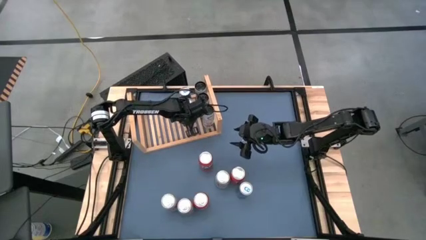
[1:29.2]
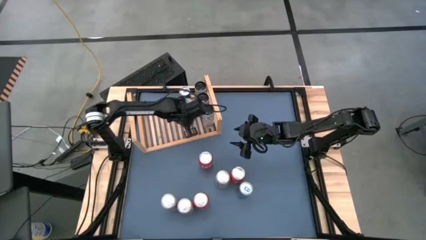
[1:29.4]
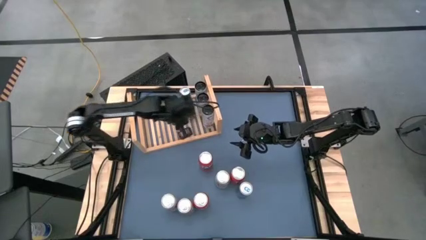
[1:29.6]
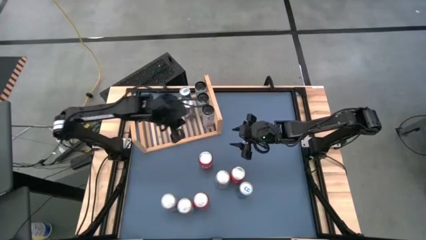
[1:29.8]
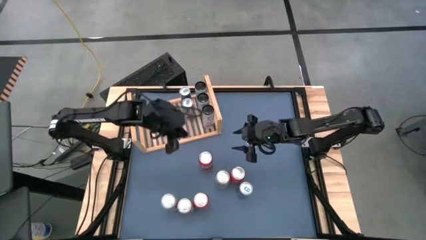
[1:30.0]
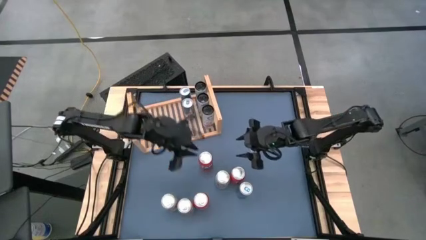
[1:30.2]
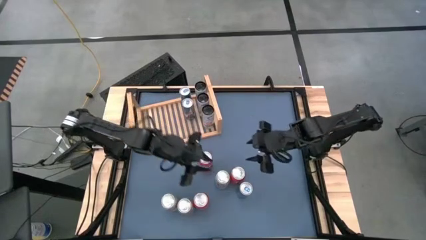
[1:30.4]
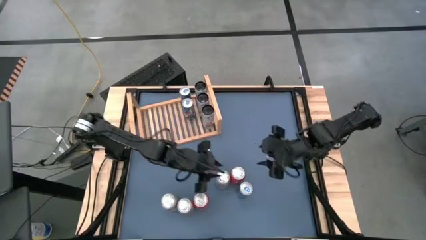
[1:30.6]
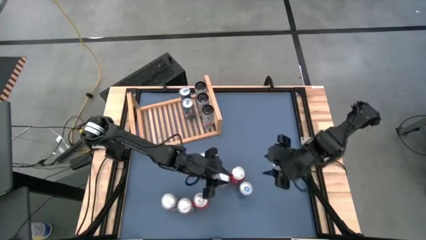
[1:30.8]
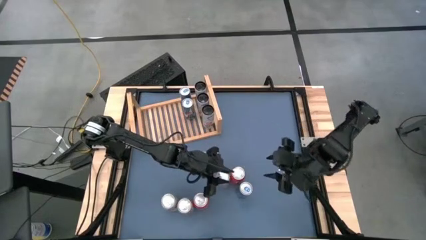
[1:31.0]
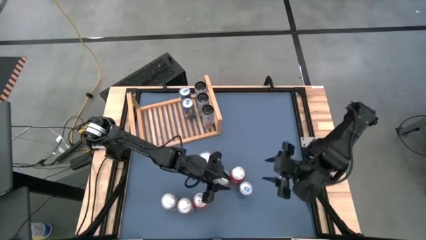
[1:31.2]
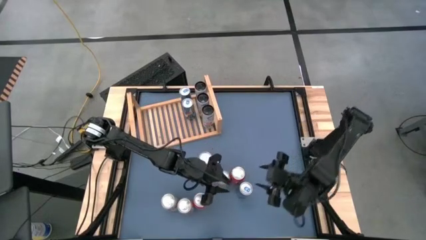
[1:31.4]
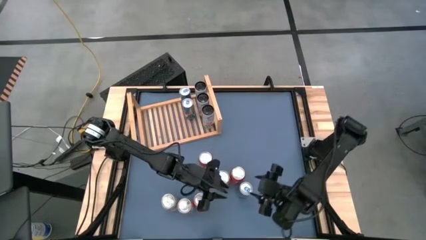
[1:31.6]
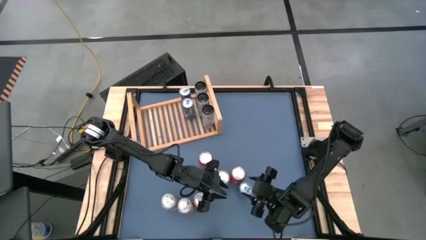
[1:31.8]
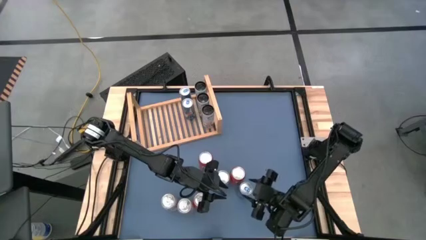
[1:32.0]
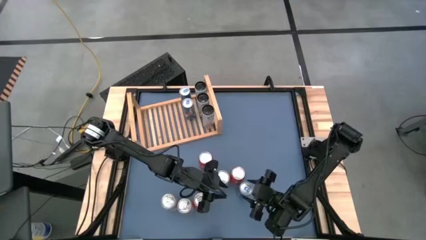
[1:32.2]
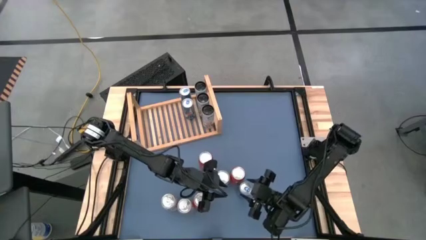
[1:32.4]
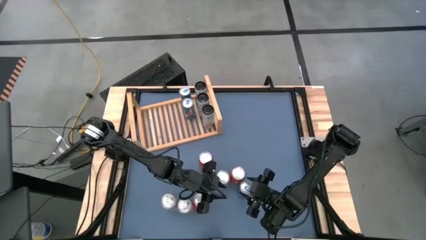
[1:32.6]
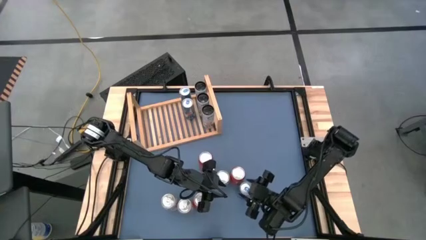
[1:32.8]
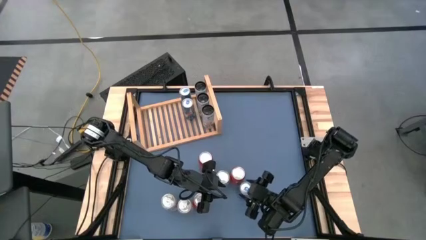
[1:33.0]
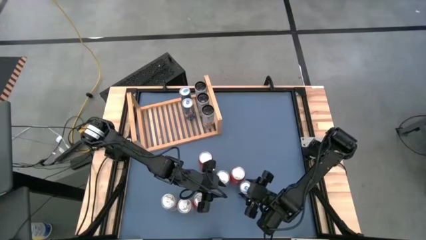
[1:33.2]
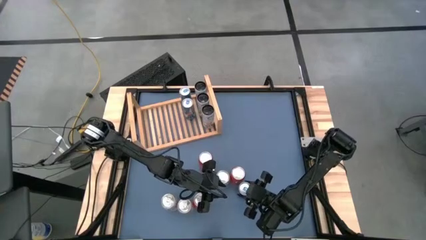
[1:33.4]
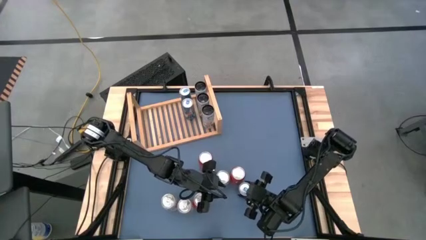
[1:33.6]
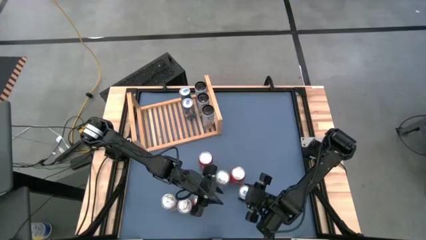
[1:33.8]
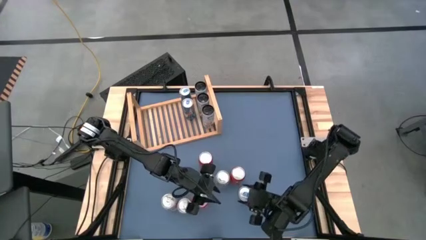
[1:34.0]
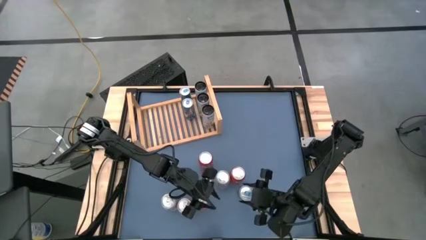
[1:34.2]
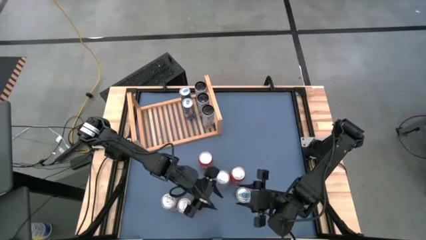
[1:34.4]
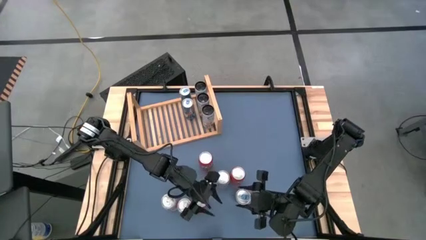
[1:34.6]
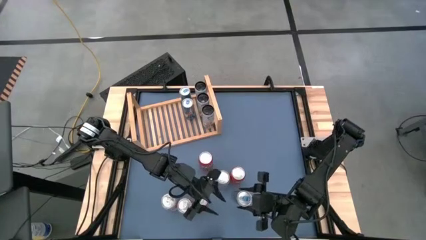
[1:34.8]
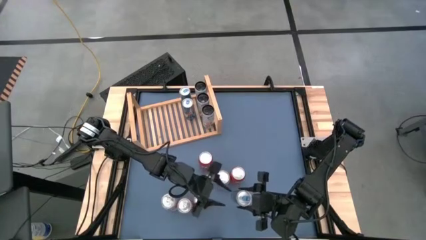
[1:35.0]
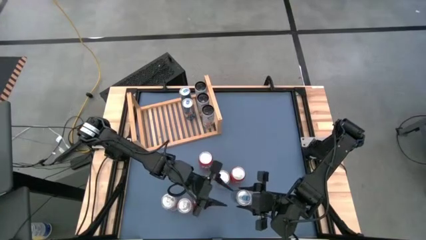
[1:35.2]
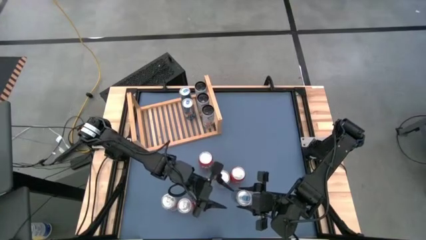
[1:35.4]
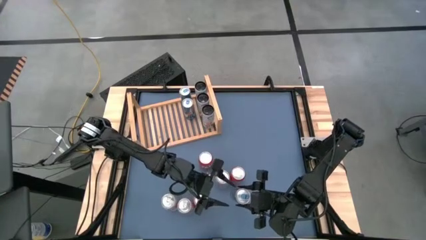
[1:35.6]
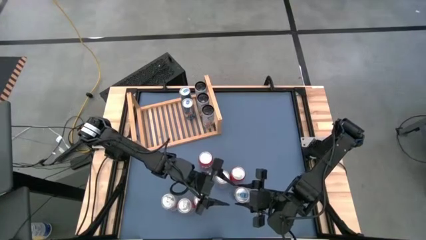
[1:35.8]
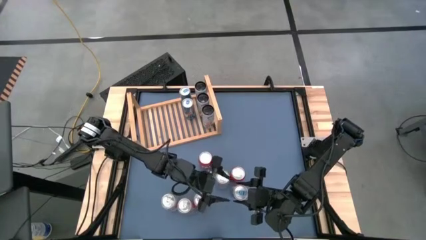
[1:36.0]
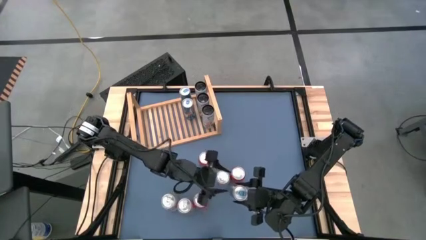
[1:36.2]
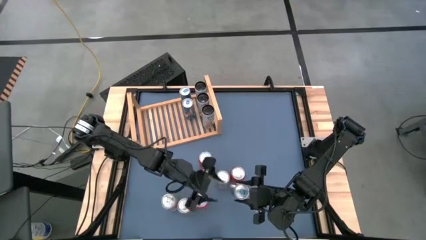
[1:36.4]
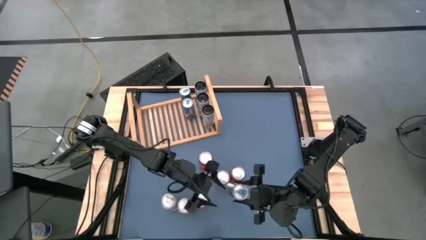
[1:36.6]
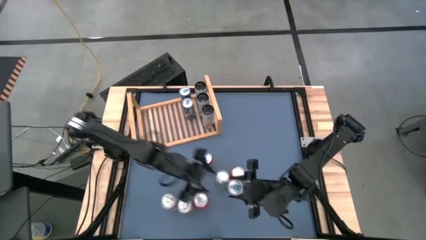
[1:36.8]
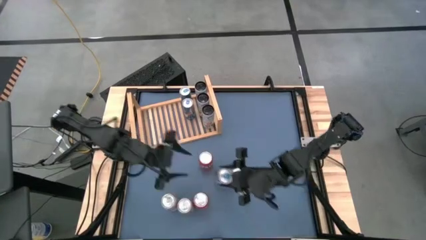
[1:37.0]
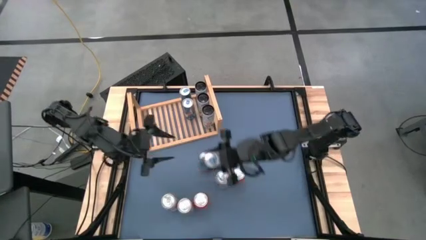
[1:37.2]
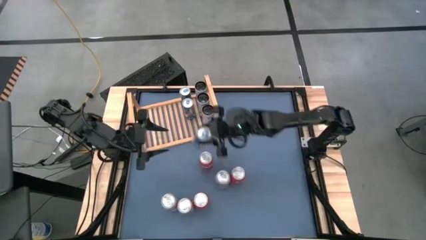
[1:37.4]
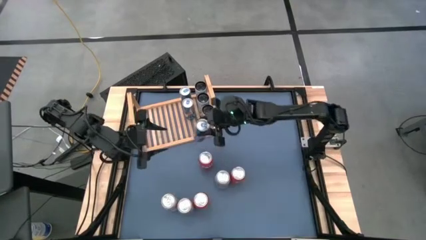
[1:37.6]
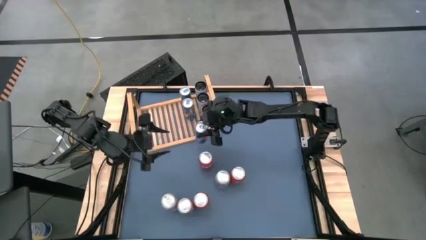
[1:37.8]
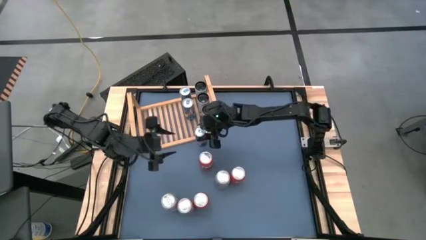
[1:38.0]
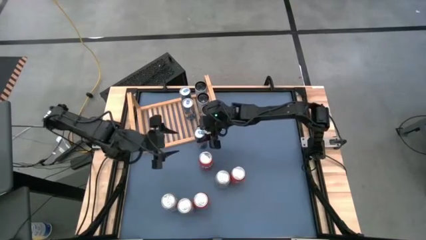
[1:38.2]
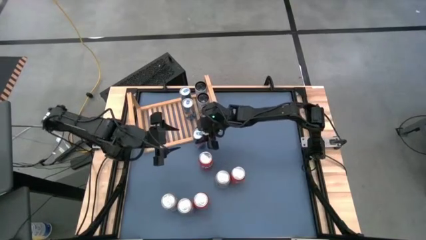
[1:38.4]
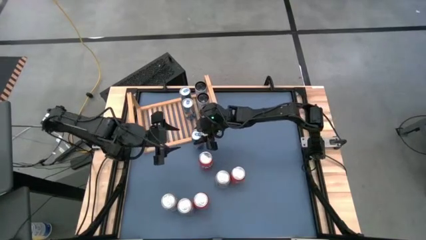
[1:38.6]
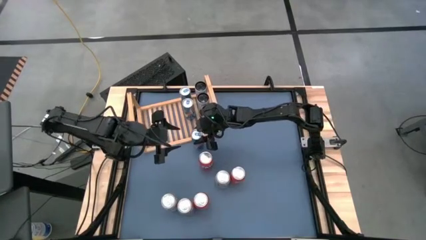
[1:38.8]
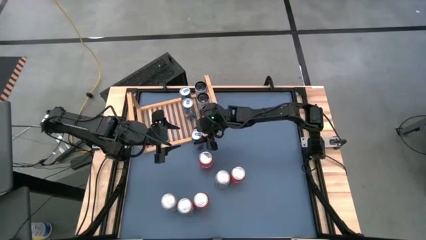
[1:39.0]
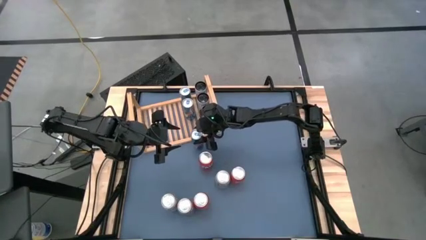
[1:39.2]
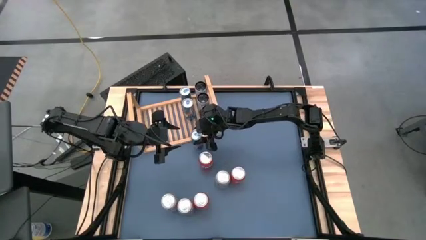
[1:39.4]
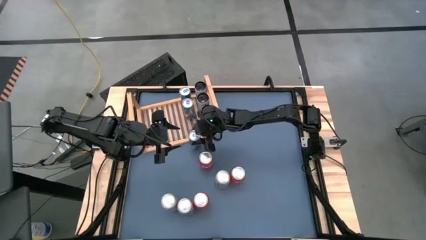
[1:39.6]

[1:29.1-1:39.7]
Task: Place canned beverage on shelf
Put the blue soda can on the shelf aligned with the other blue soda cans

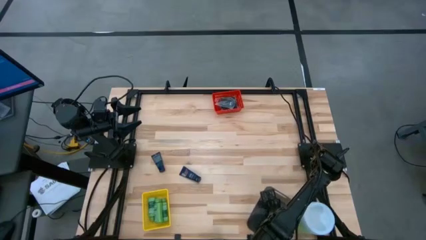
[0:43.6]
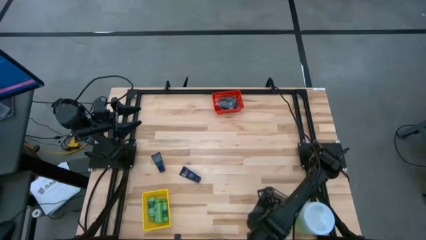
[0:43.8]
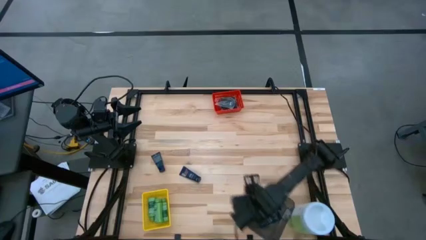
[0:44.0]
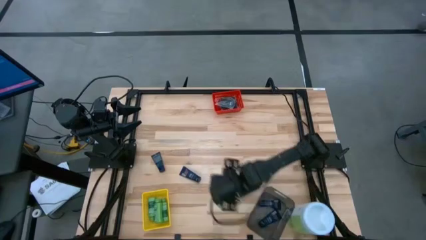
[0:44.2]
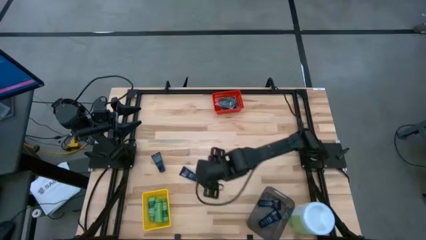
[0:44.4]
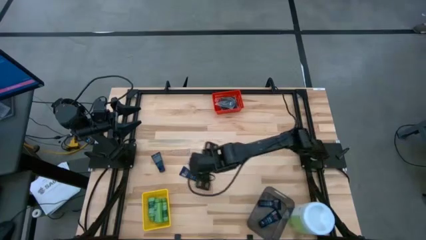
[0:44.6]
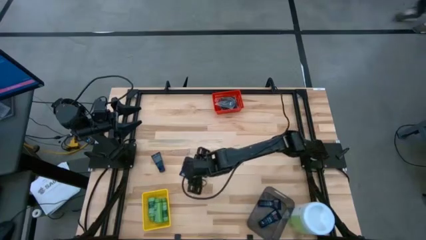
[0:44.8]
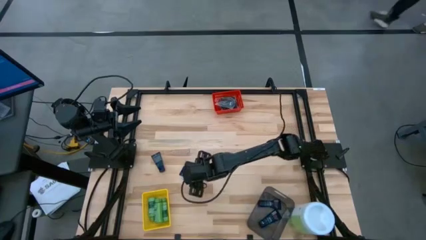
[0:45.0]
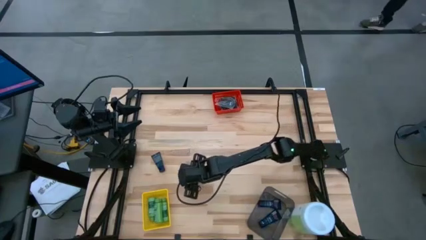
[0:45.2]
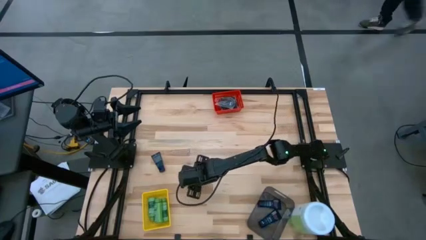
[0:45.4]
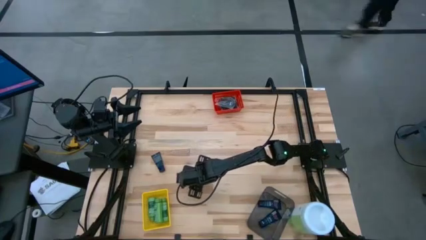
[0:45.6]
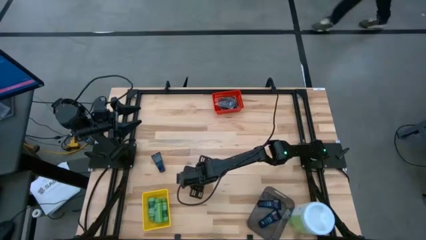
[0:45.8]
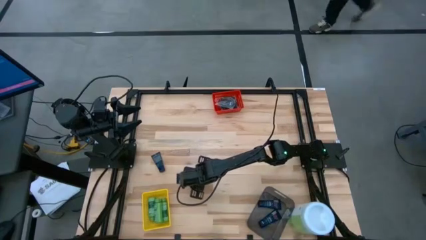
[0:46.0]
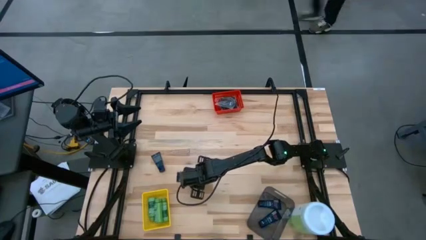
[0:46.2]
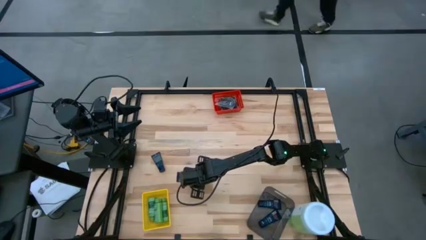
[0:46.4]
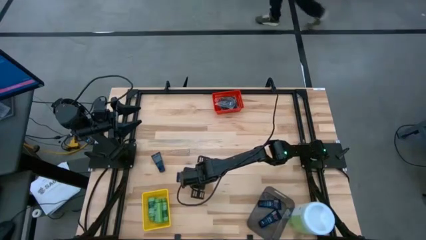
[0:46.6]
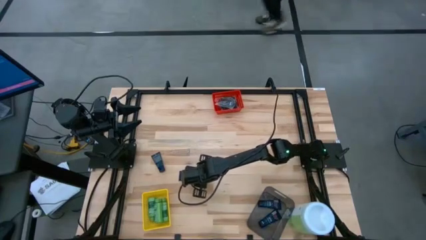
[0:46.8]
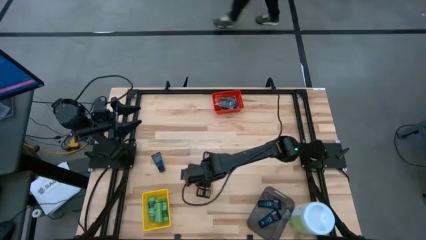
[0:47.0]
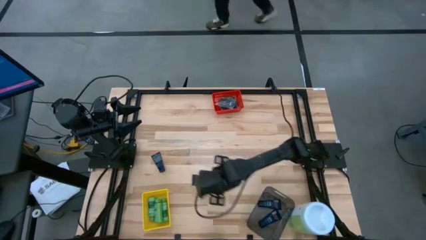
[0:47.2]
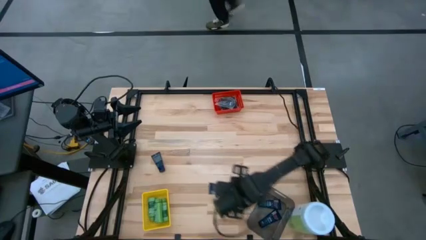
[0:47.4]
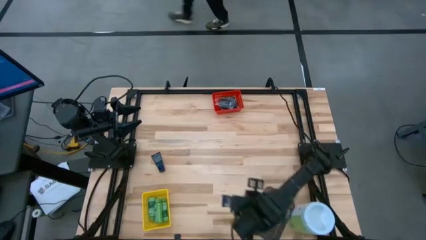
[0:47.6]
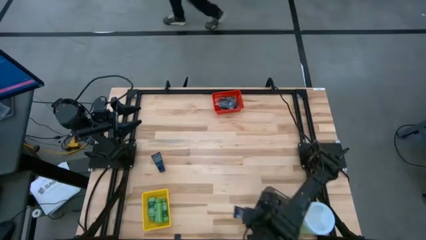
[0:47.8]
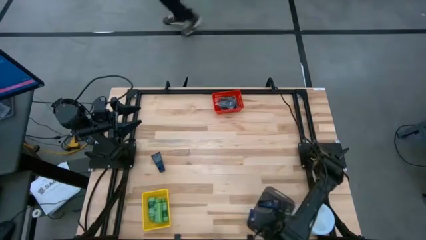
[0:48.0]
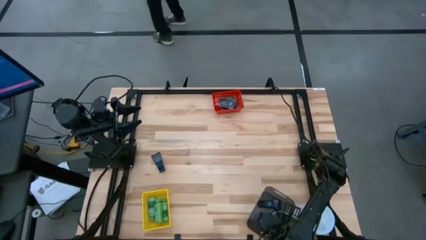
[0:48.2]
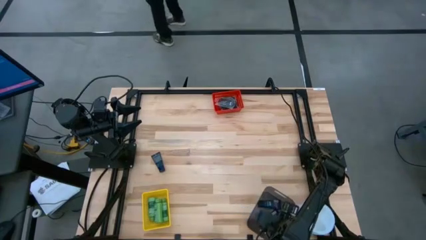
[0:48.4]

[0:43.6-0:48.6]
Task: Pick & Place Travel size toiletries
Put the blue shave cream into the black bin

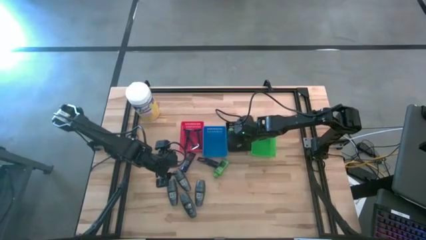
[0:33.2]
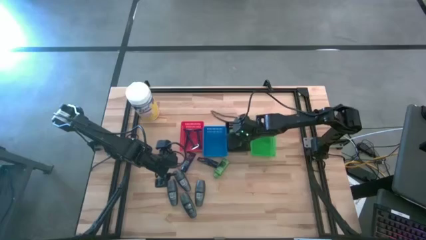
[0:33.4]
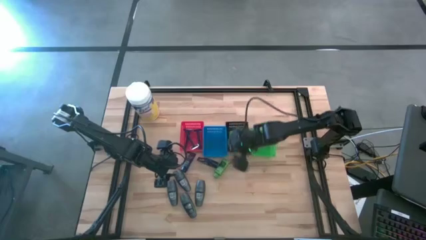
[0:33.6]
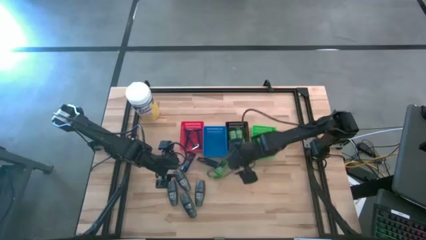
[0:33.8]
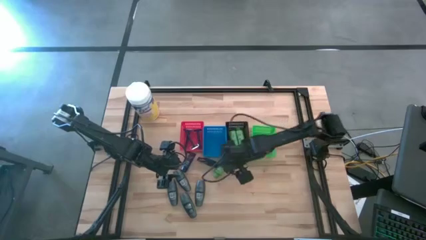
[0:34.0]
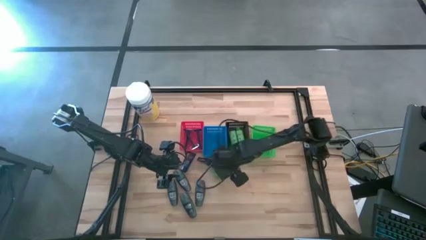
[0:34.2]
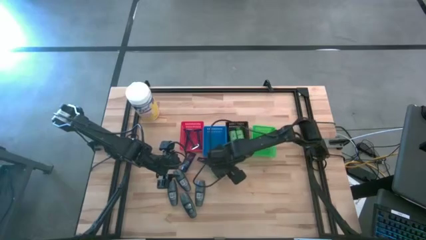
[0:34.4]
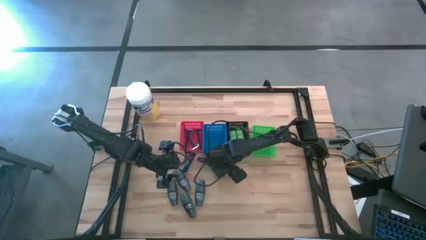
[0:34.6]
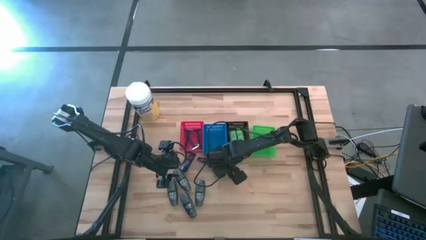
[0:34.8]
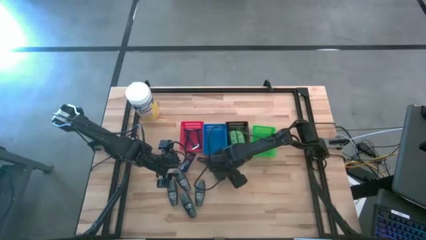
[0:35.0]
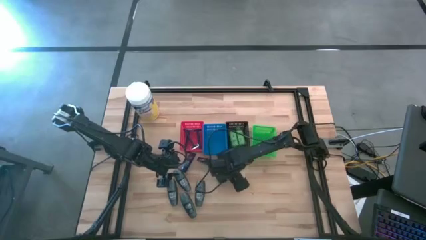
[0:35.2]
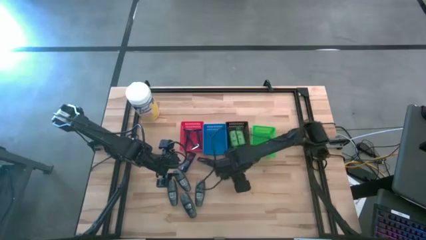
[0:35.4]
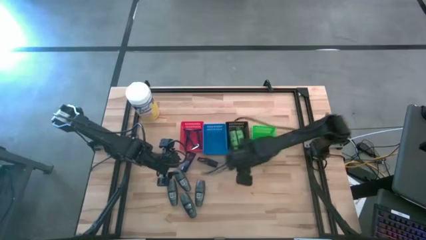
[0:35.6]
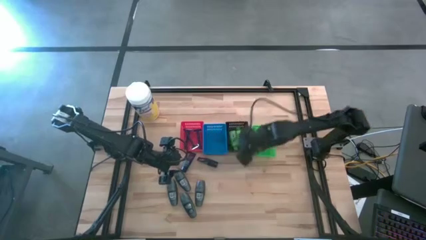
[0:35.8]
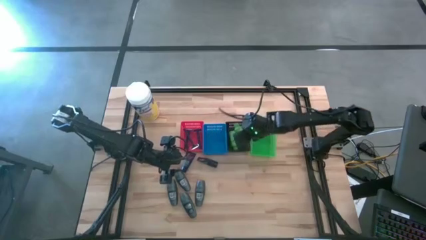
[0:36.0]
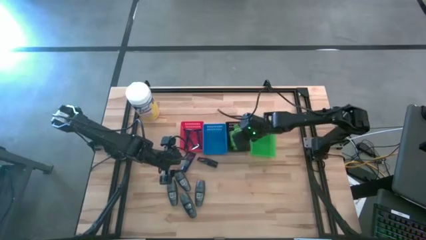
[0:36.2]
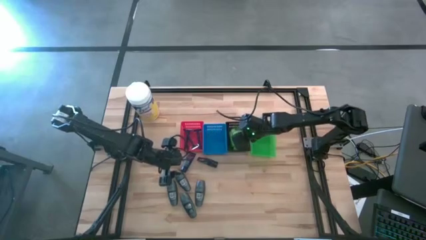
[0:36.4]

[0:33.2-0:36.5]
Task: Pick & Place Travel size toiletries
Put the shampoo into the black basket
